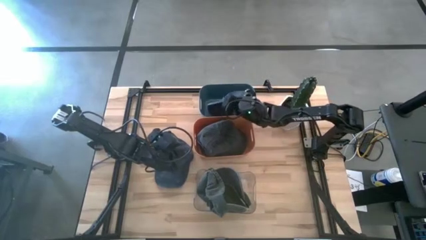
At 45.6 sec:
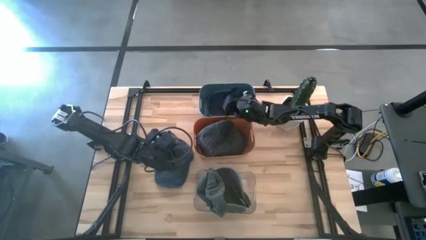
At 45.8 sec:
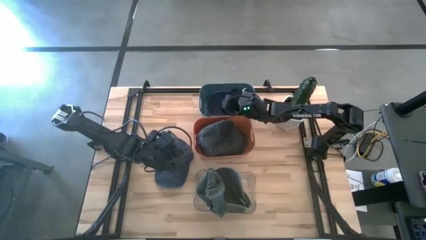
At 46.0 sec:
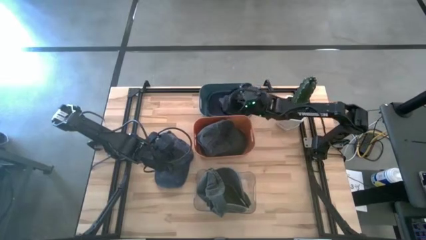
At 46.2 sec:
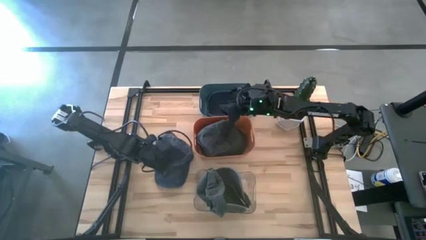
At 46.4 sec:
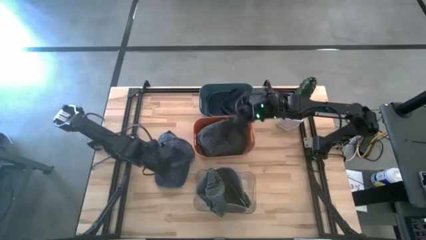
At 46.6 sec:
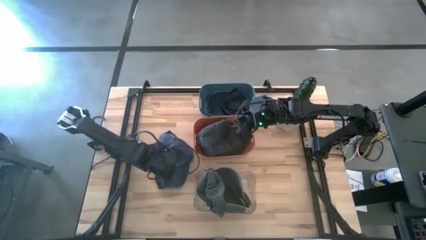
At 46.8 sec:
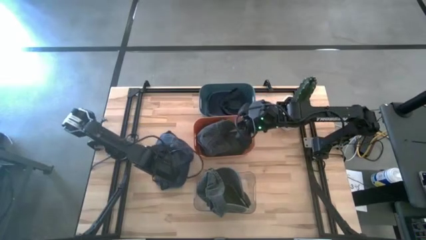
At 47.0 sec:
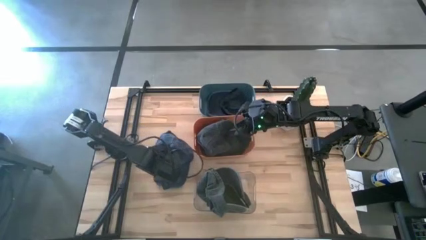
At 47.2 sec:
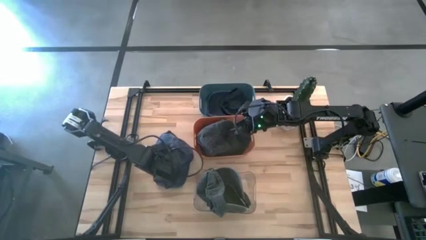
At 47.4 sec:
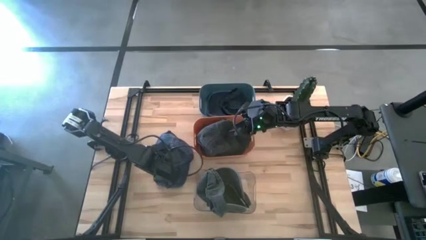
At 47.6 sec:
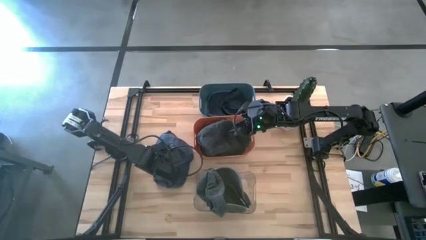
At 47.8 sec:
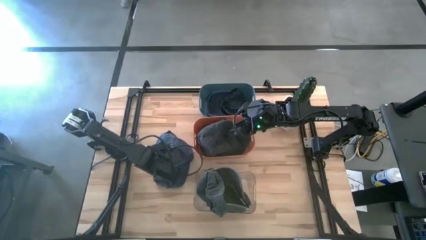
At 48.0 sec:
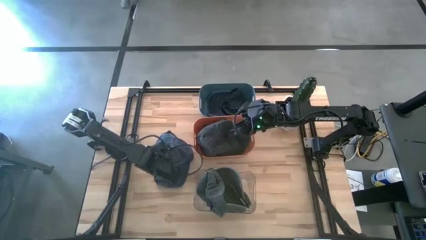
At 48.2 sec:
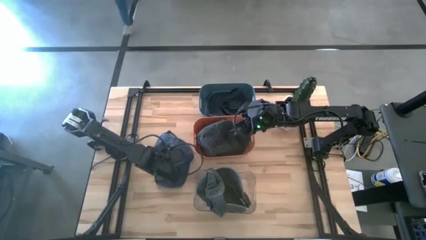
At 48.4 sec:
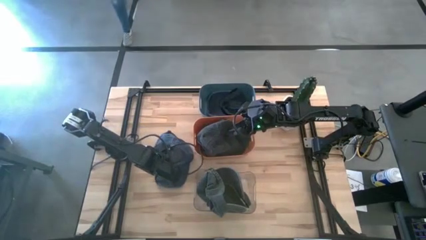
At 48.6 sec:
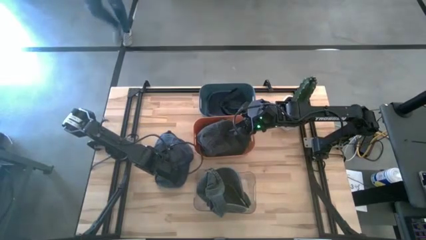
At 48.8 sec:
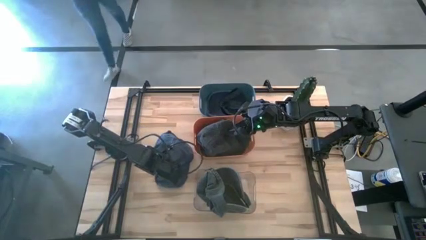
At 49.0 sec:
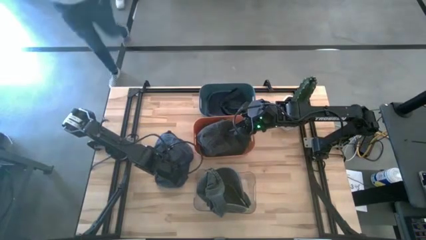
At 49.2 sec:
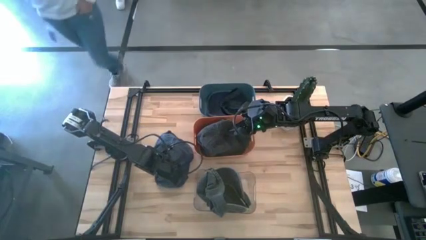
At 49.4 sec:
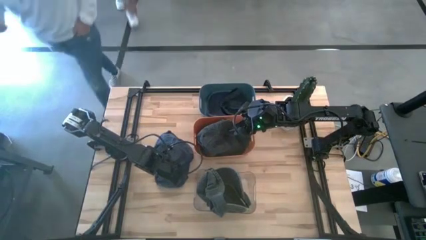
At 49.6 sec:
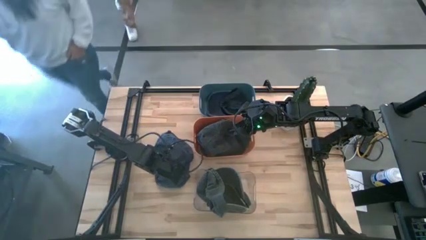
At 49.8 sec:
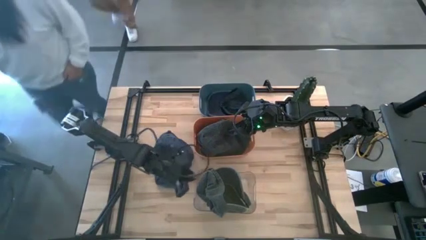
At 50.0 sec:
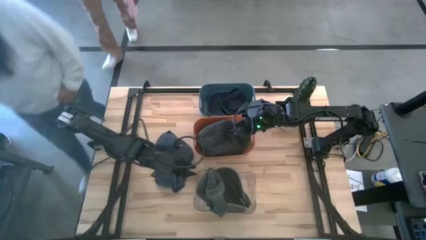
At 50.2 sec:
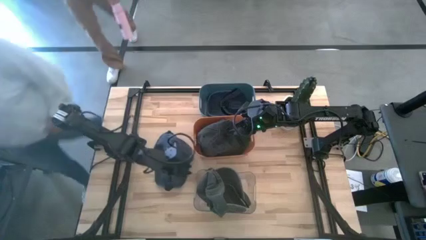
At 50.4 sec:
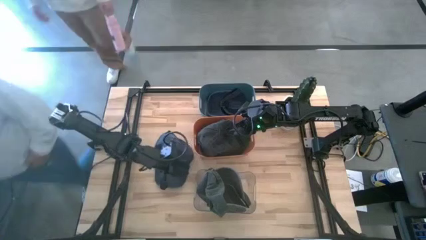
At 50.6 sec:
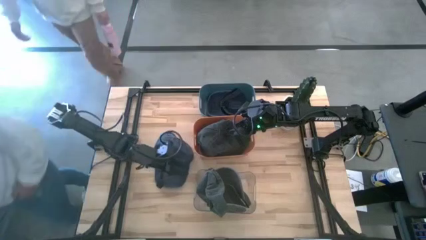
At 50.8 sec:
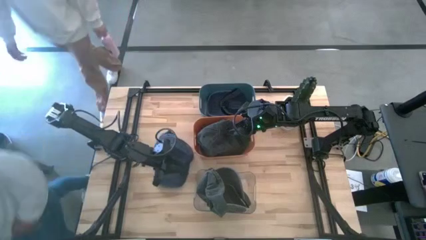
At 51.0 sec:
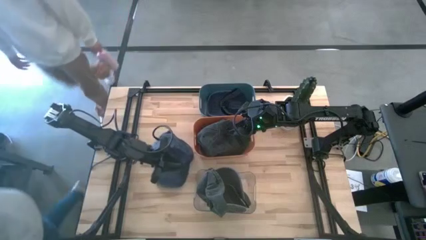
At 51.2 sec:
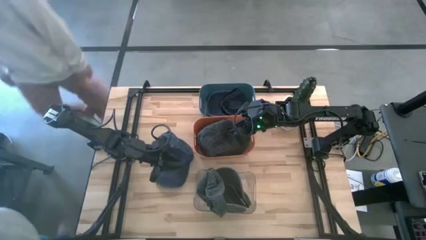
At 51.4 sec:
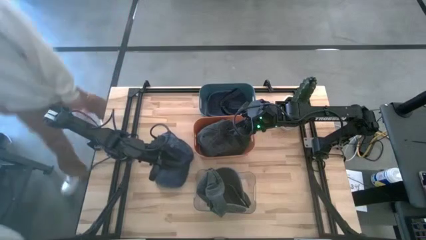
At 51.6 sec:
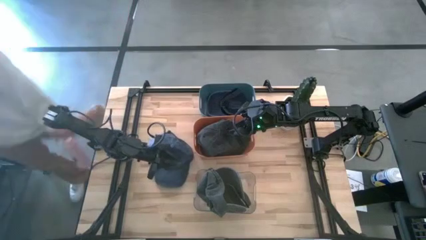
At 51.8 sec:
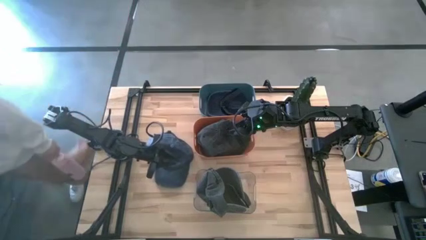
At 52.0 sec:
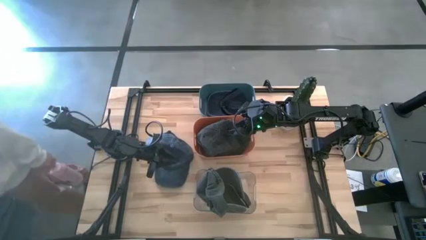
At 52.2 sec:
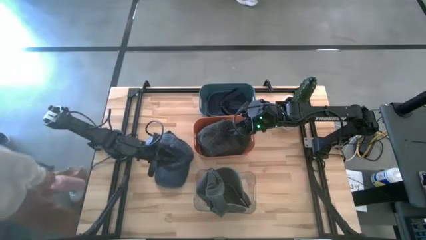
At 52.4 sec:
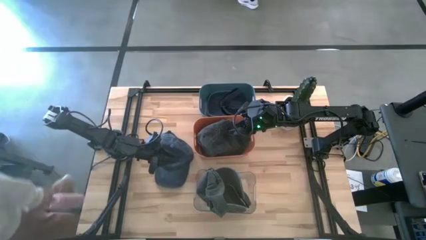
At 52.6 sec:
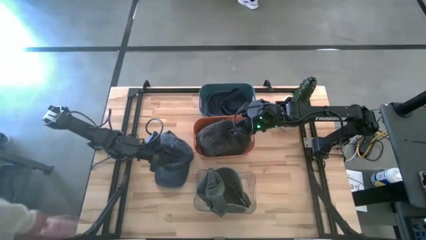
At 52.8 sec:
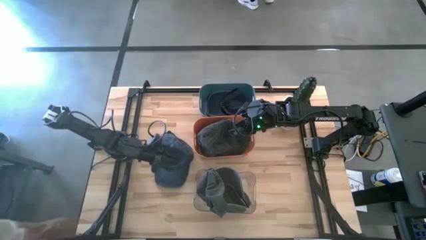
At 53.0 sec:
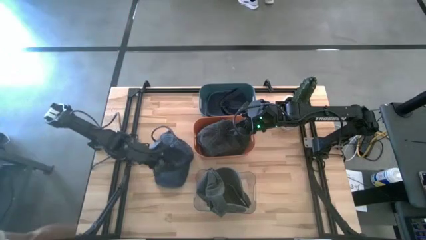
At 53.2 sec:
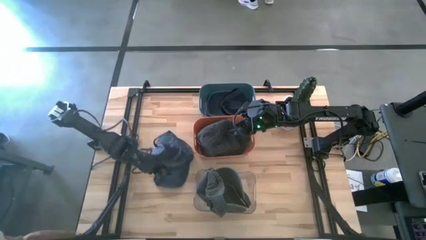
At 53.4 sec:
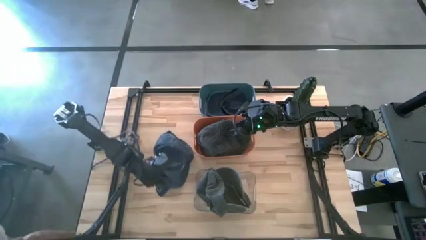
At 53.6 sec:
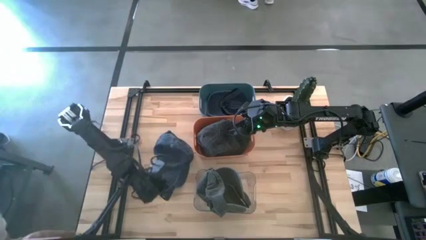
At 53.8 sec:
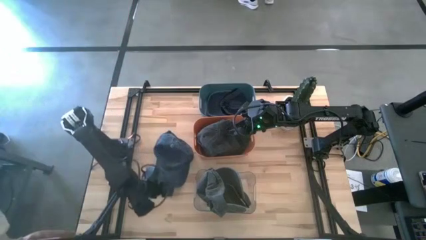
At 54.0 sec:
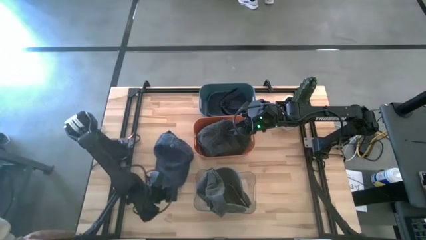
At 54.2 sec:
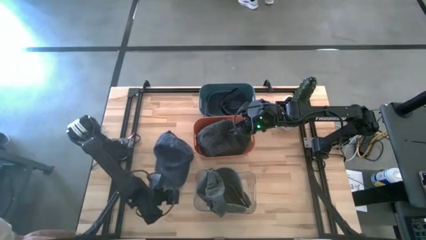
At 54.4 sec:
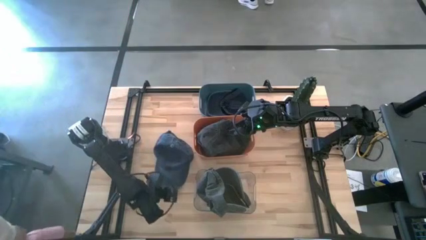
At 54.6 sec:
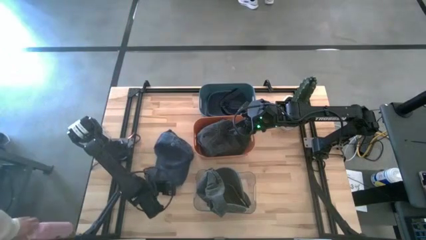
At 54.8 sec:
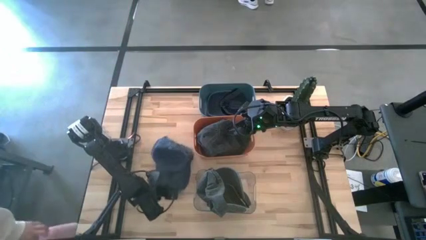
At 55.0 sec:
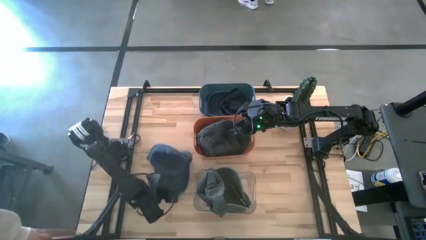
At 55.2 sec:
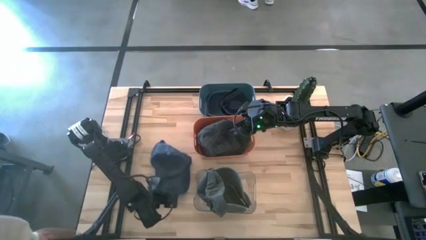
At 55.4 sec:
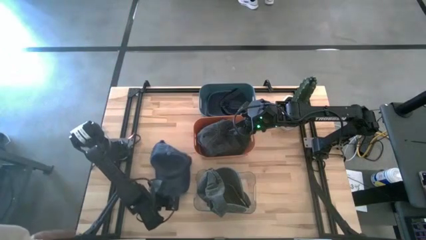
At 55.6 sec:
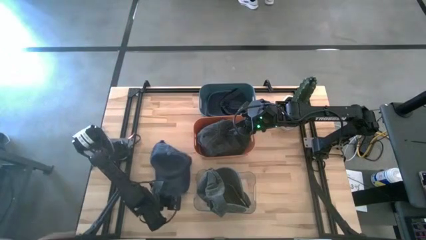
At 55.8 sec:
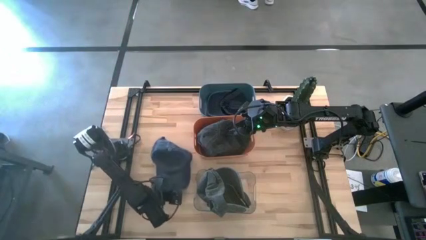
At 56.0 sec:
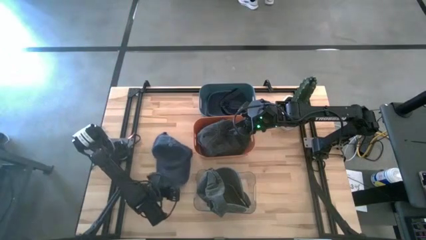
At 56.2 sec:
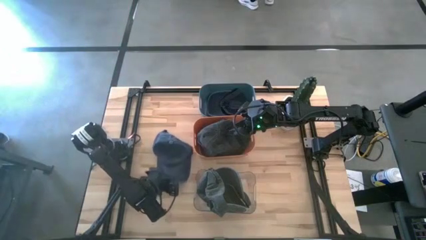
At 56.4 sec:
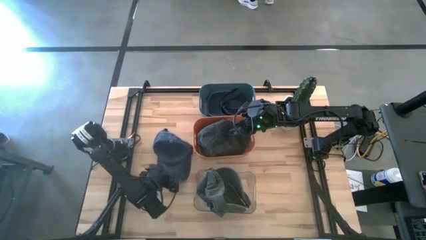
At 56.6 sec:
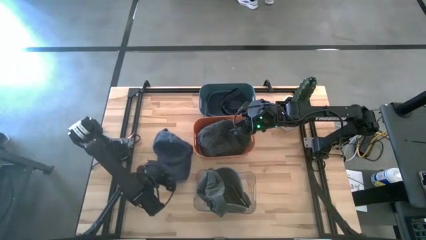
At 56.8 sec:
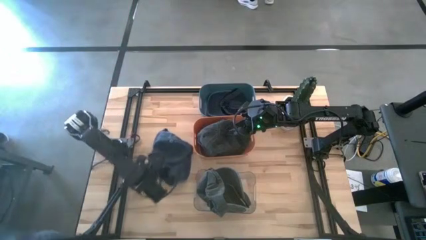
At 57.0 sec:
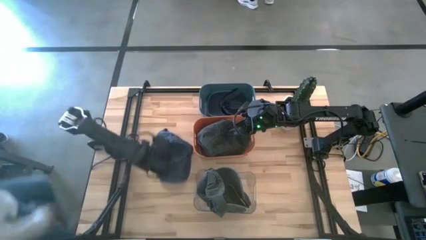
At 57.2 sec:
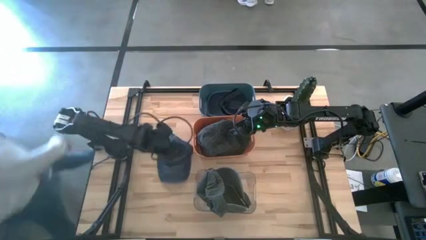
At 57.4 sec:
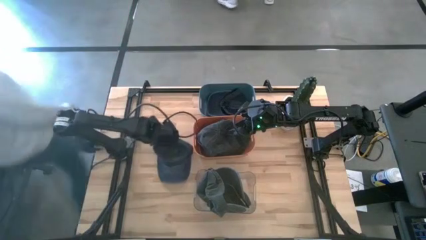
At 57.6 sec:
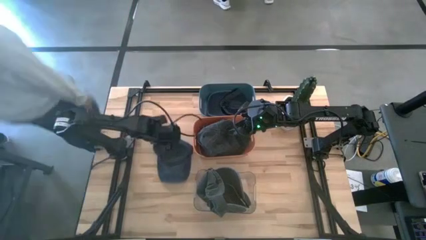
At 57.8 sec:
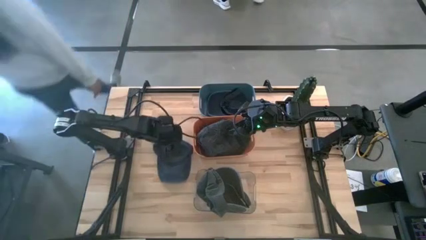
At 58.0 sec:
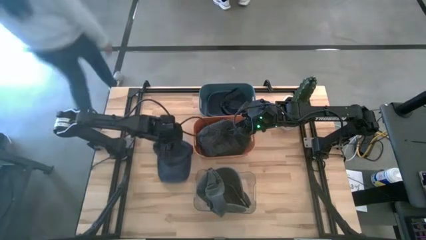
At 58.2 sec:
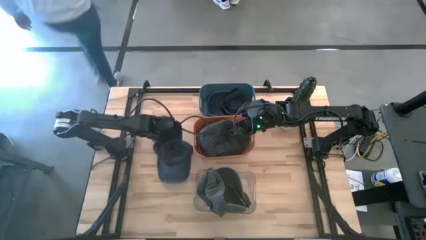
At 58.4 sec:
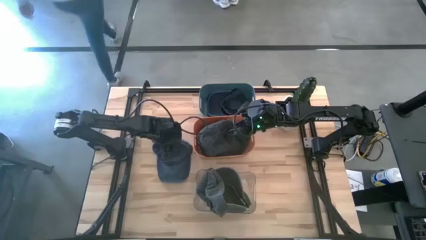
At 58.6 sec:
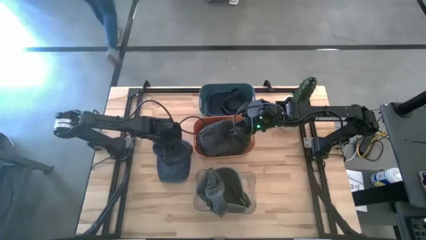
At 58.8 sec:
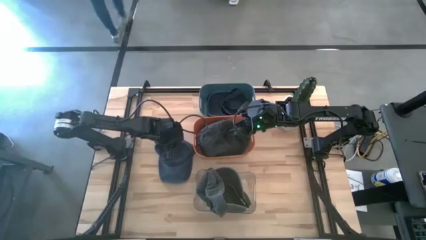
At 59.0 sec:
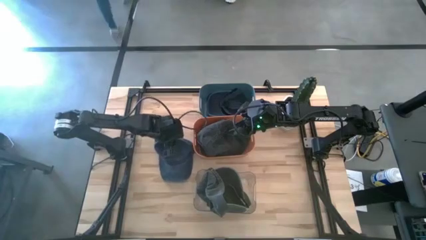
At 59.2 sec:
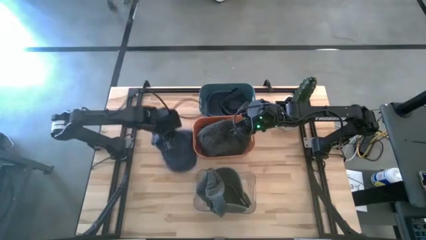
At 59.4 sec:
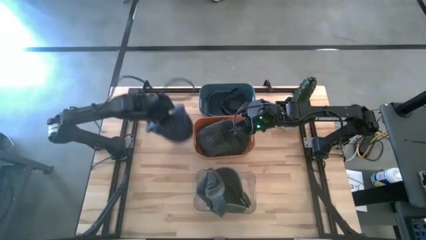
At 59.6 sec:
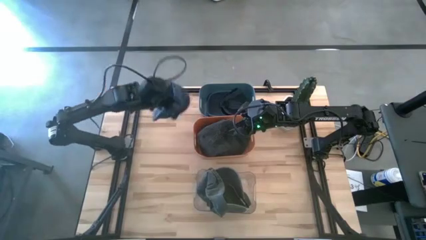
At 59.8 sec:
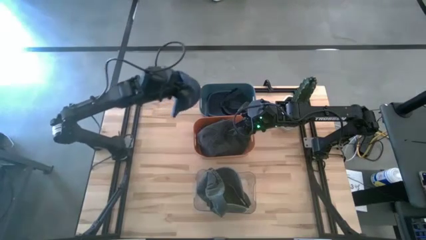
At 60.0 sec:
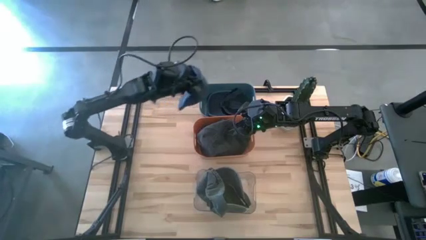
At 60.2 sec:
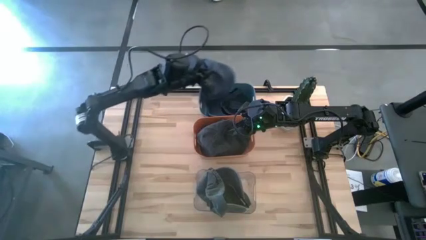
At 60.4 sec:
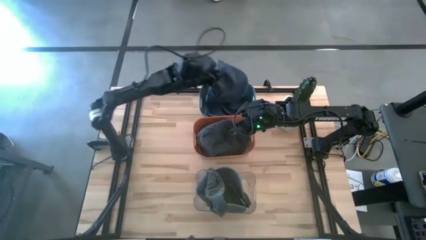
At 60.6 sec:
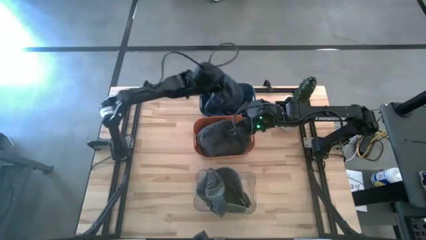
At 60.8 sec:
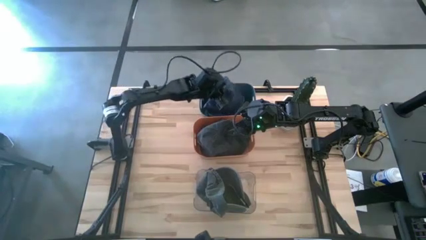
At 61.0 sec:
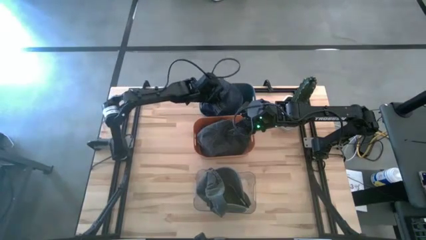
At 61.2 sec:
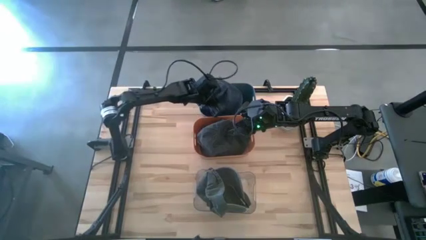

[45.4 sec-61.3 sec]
Task: Pick & Place hat
Put the blue cap into the blue bin
